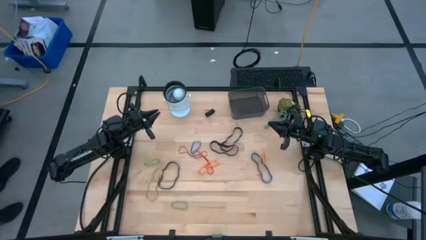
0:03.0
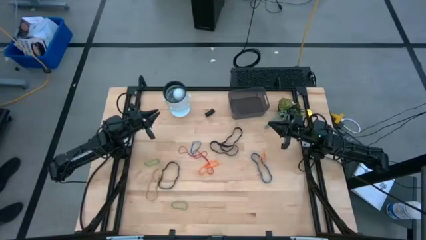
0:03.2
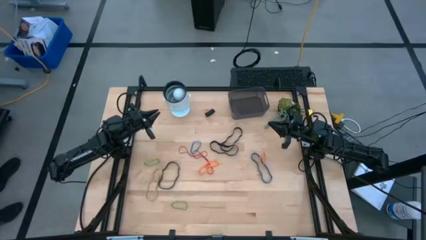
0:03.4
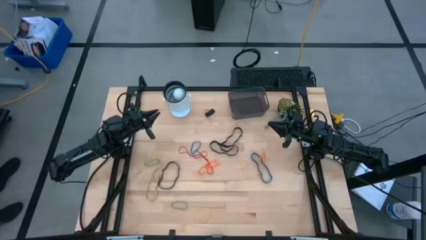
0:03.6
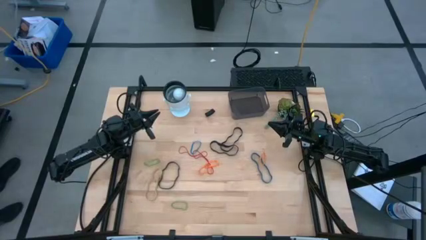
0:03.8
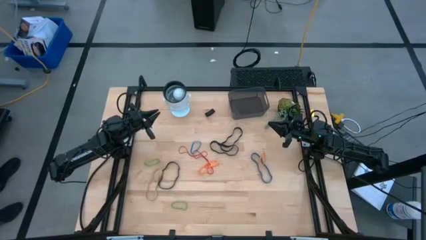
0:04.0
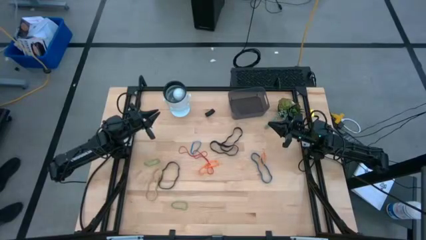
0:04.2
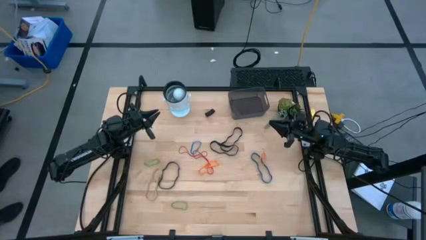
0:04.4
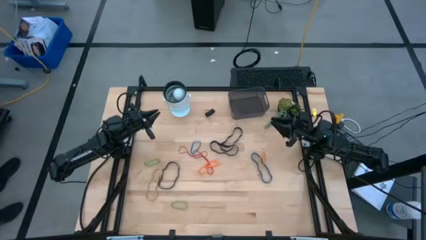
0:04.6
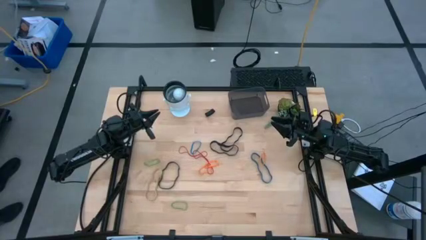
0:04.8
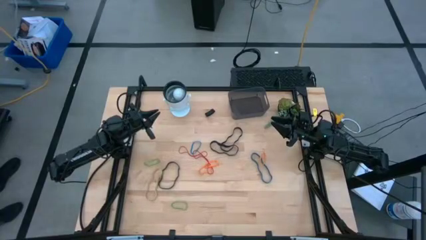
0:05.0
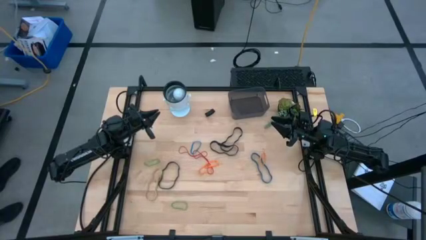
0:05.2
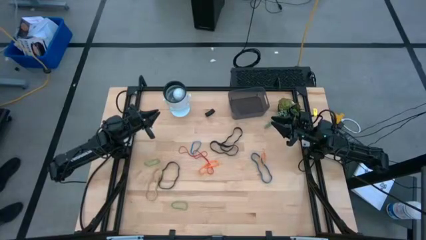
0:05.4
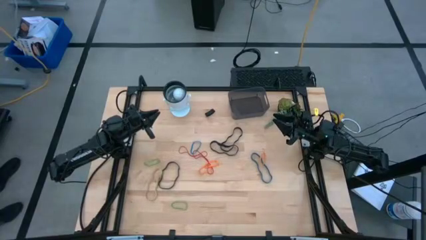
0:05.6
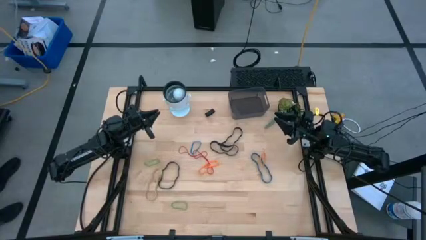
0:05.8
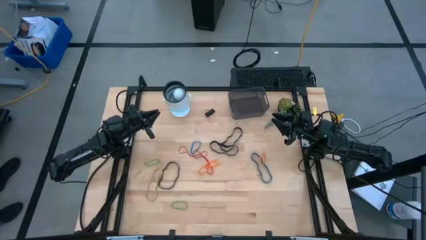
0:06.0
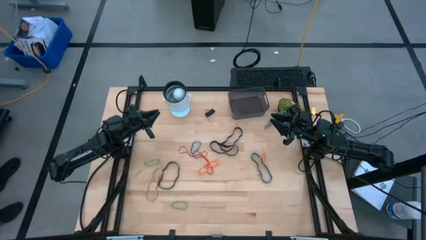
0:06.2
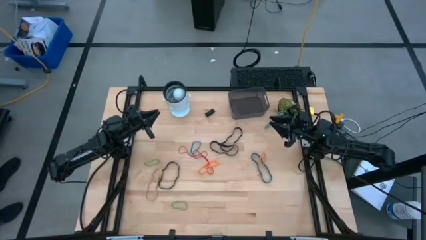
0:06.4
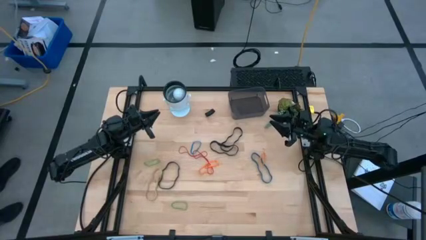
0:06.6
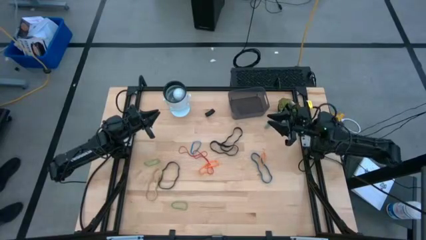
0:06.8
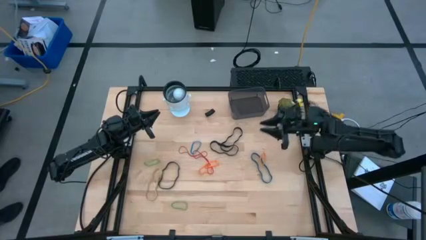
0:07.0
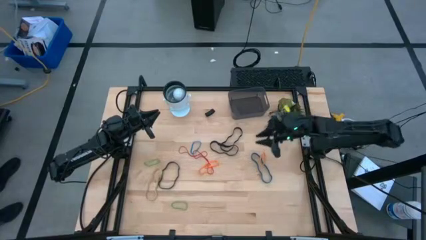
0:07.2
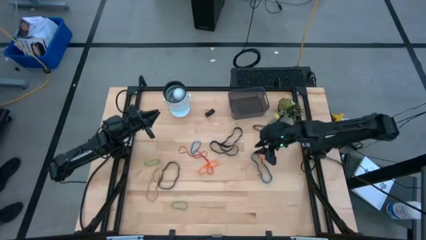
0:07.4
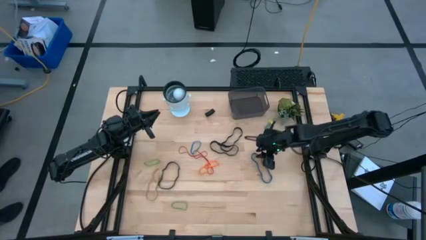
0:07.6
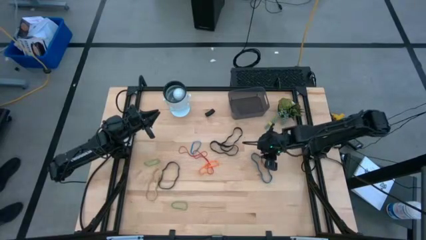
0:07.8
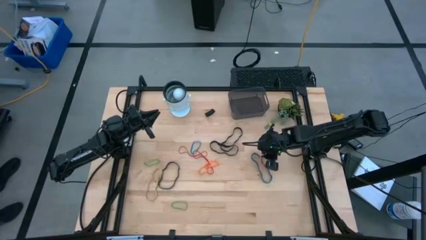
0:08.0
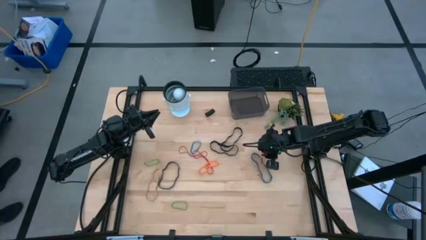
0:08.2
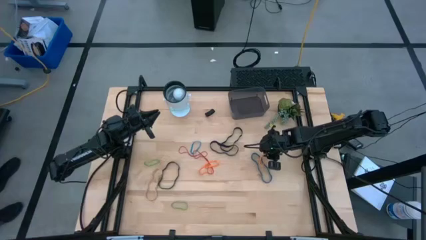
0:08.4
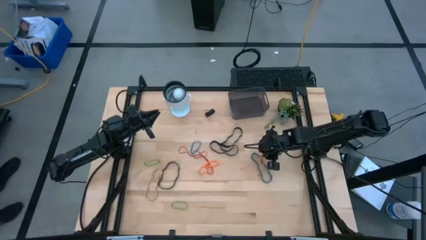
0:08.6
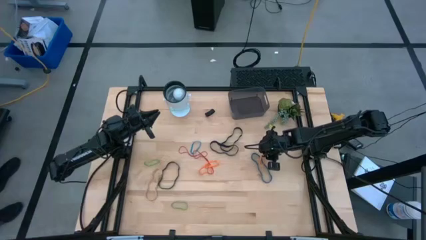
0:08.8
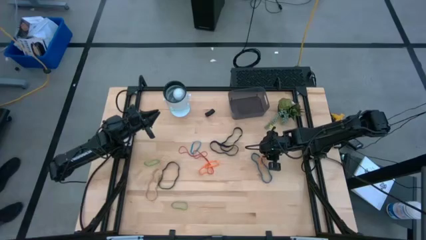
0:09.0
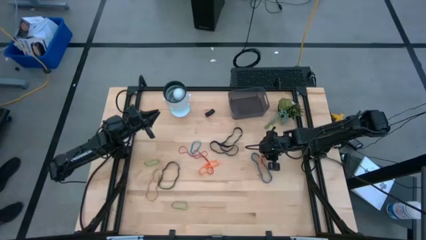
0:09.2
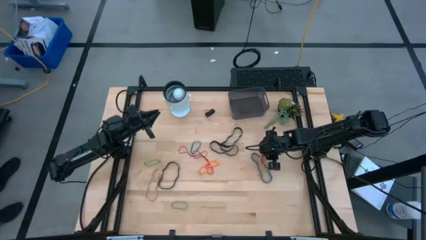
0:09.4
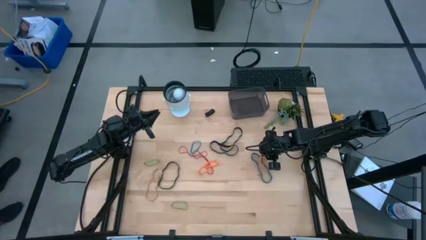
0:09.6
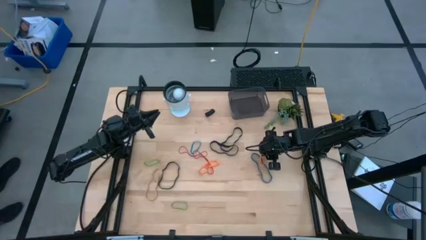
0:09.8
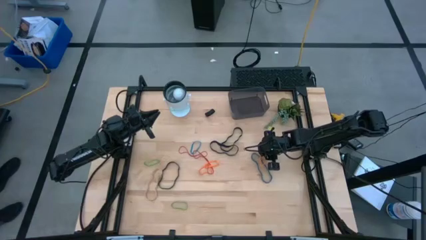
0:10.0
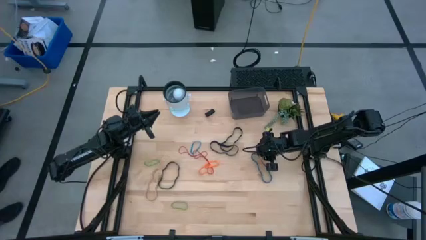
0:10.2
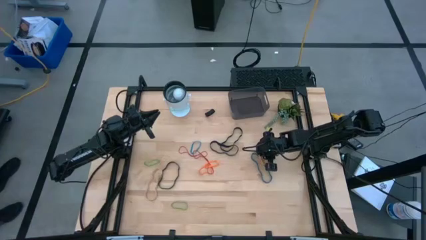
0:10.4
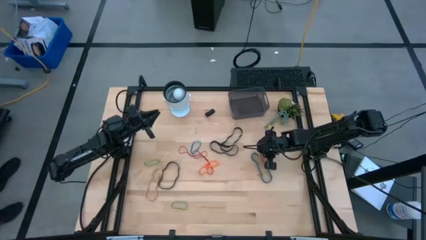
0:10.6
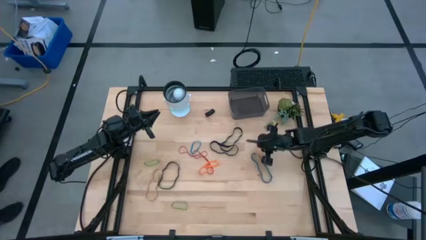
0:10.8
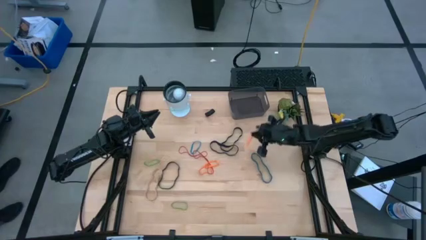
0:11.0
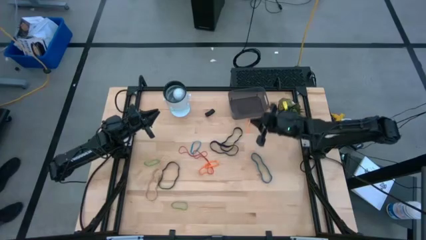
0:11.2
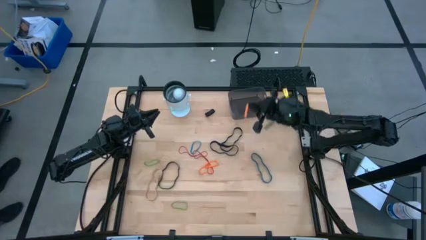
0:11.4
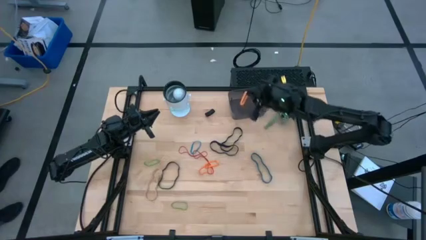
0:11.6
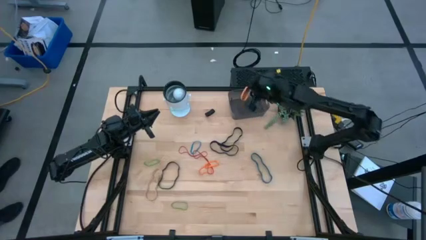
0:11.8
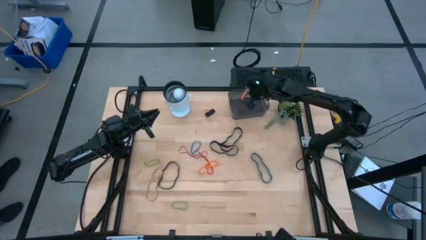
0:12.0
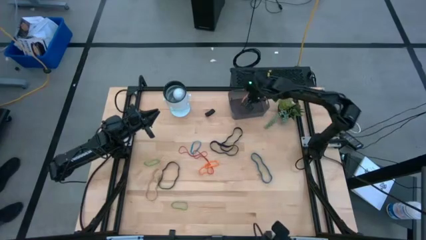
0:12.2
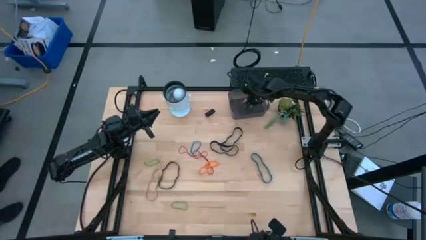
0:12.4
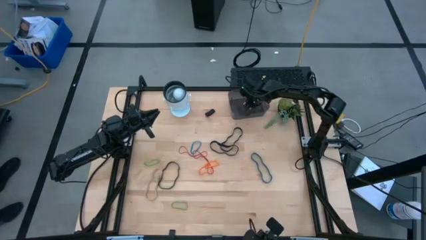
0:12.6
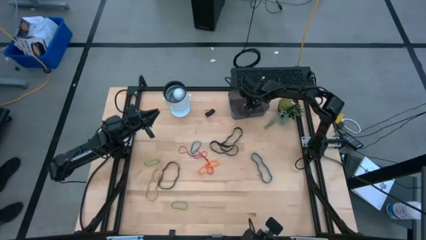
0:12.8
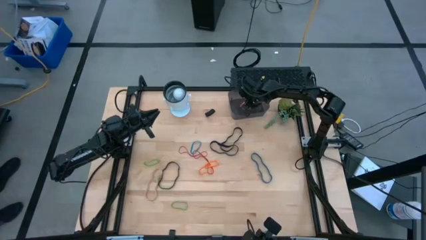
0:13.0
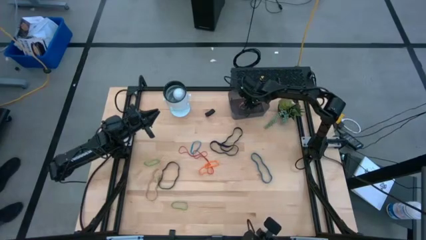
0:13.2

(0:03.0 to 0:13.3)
Task: Pick and place rubber bands into bin
Put the orange rubber band into the black bin

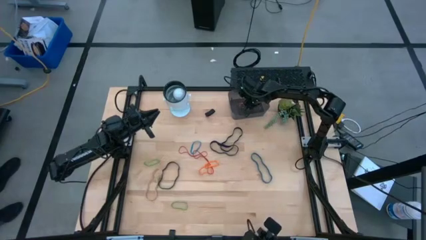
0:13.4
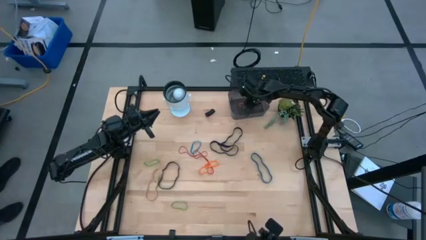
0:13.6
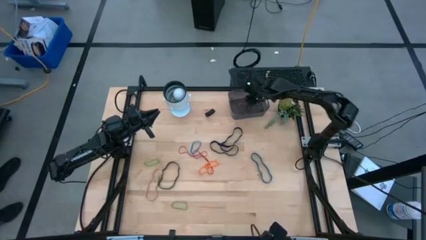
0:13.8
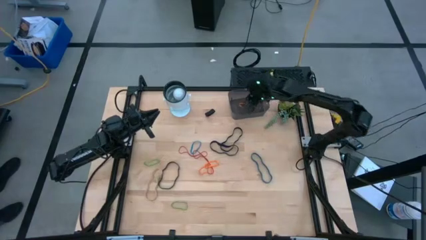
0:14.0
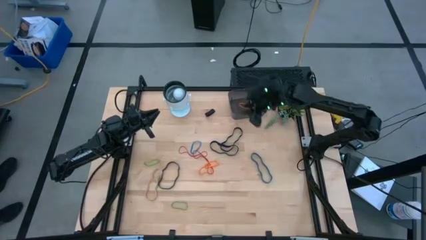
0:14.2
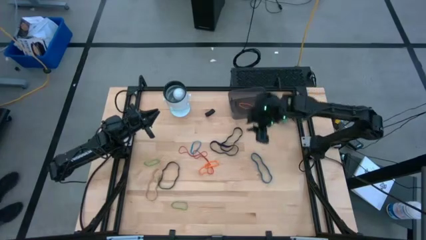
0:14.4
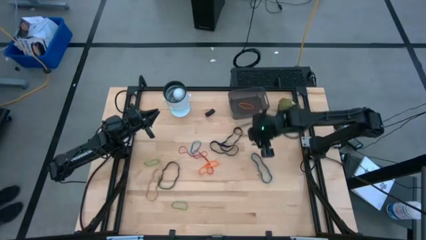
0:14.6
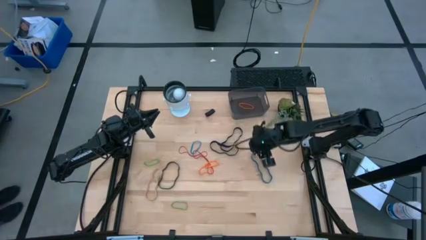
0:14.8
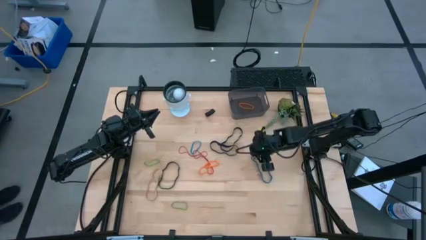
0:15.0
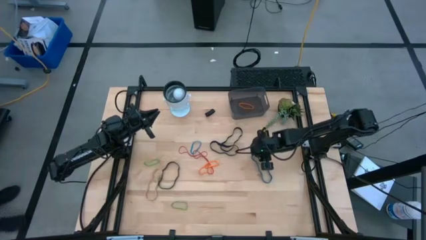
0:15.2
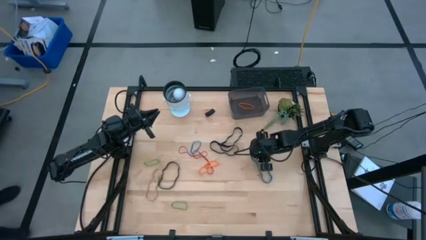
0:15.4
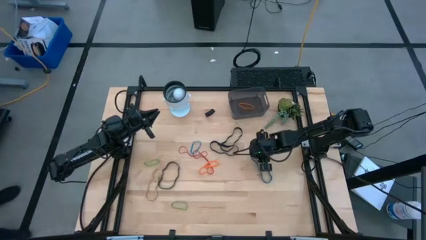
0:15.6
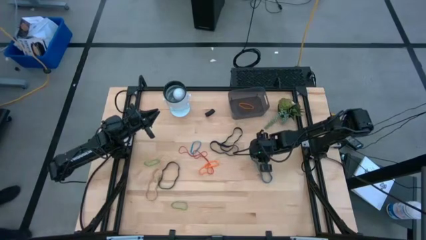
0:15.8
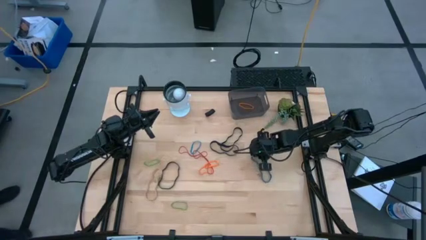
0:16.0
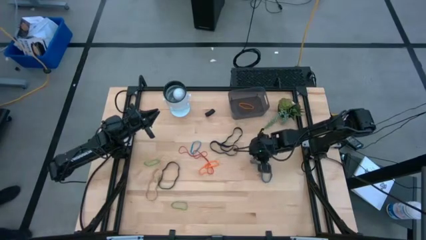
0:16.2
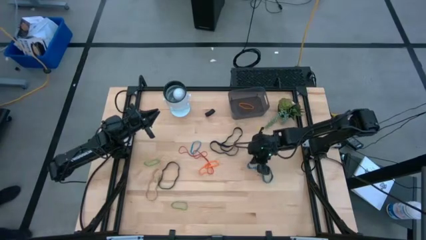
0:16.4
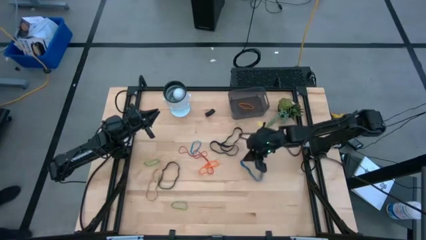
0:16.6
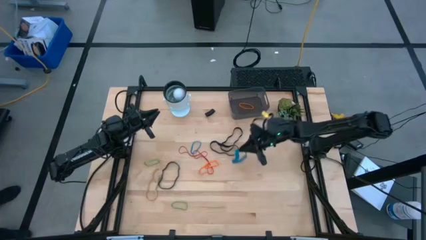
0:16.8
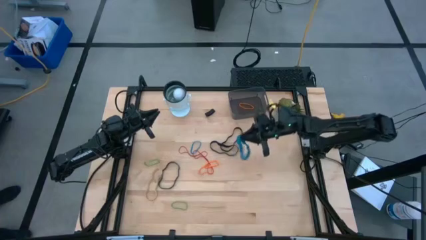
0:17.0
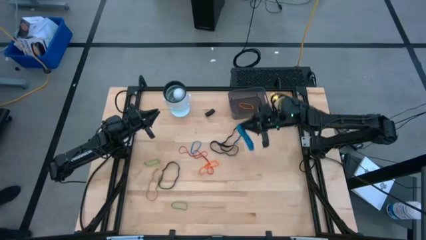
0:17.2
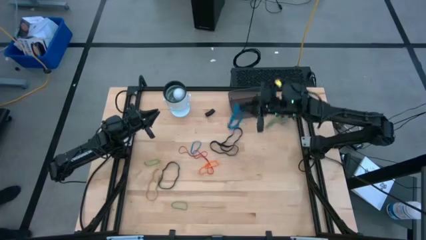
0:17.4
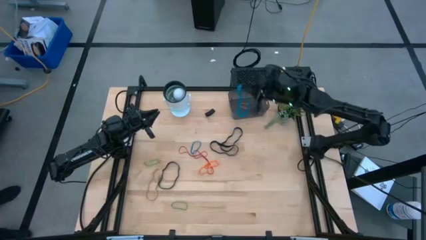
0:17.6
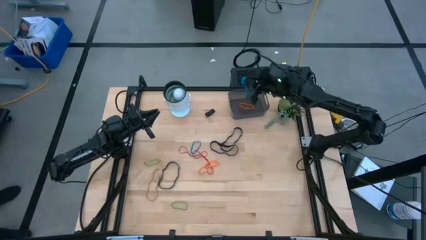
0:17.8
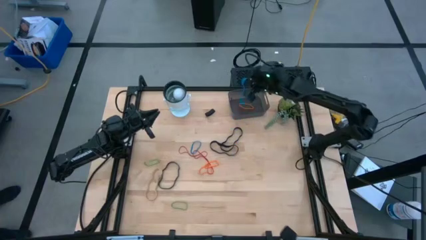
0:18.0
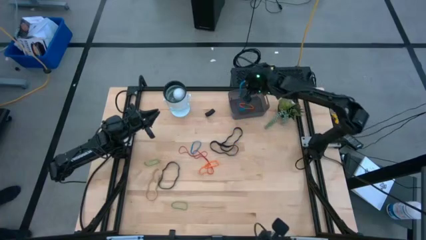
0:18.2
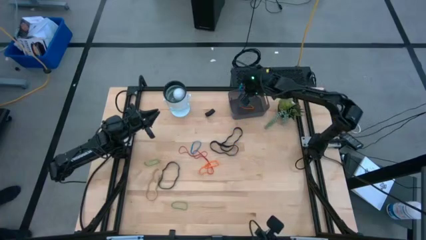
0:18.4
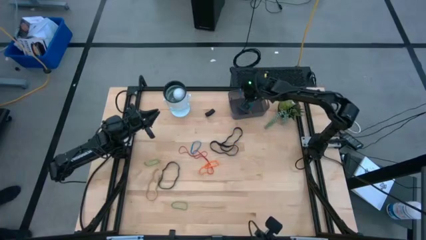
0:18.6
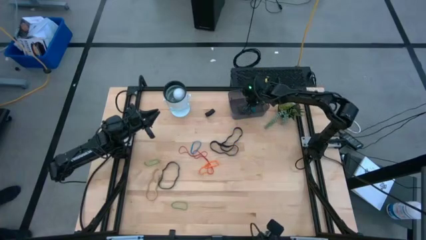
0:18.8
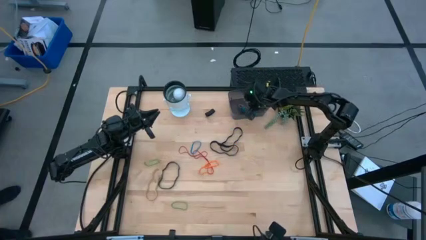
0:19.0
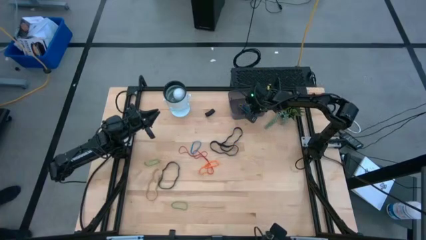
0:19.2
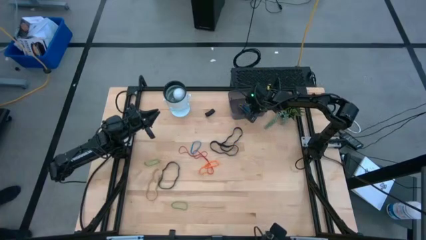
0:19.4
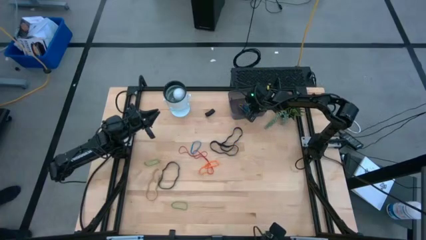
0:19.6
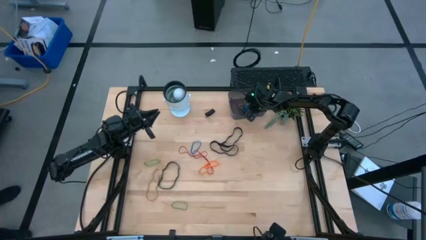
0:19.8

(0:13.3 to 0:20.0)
Put the blue rubber band into the black bin
